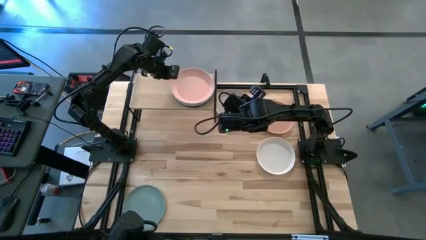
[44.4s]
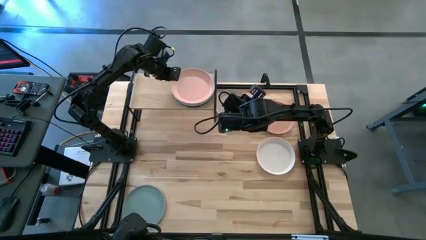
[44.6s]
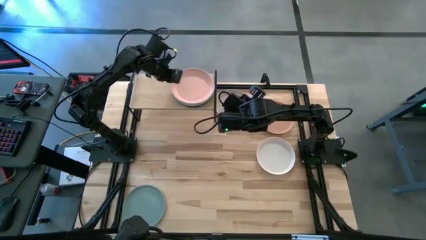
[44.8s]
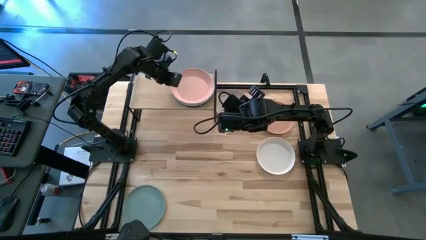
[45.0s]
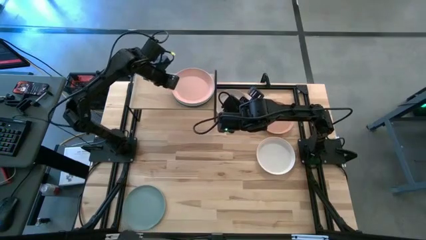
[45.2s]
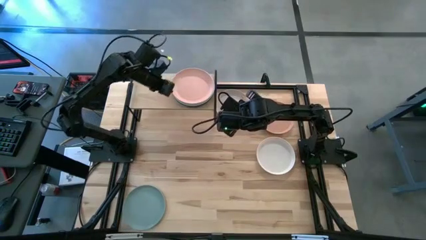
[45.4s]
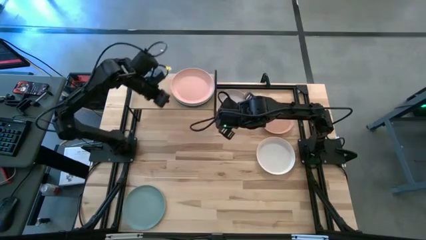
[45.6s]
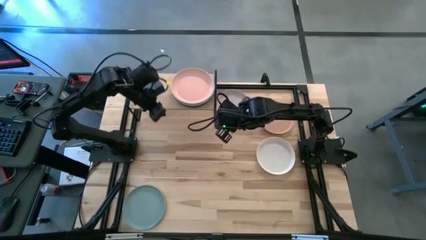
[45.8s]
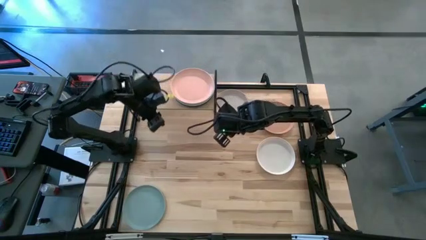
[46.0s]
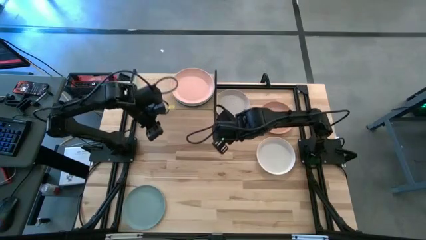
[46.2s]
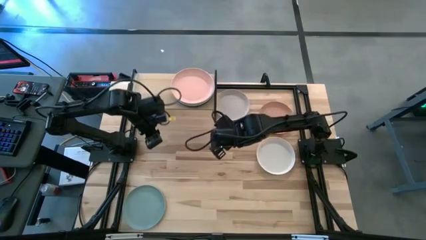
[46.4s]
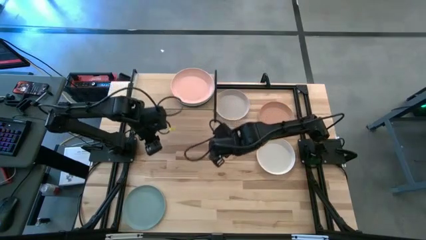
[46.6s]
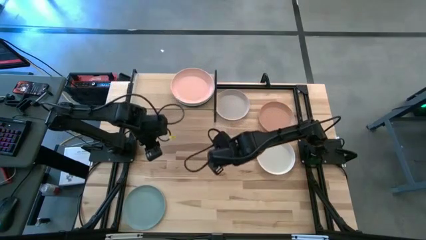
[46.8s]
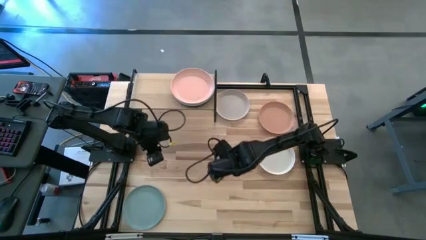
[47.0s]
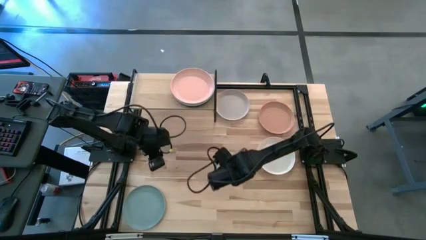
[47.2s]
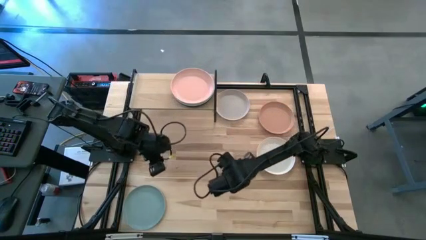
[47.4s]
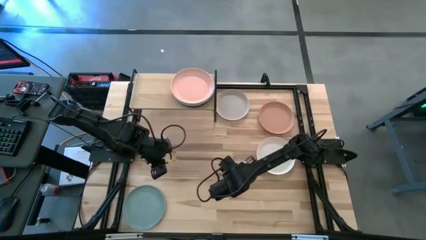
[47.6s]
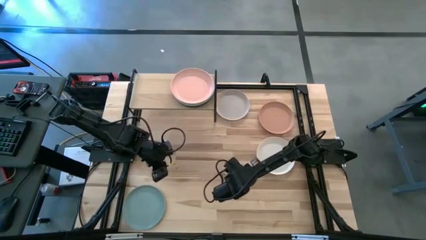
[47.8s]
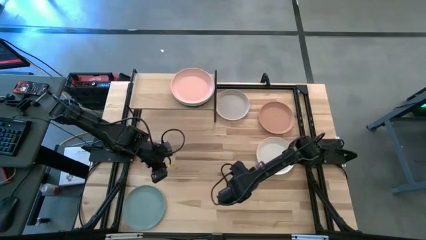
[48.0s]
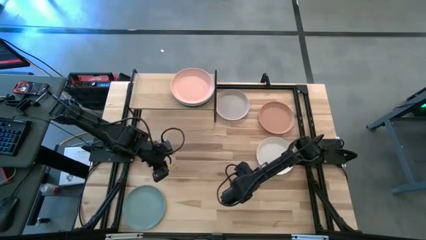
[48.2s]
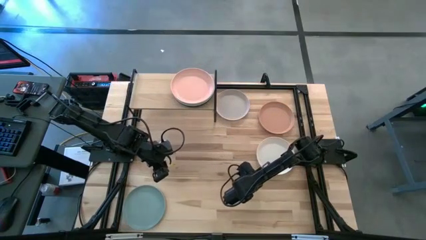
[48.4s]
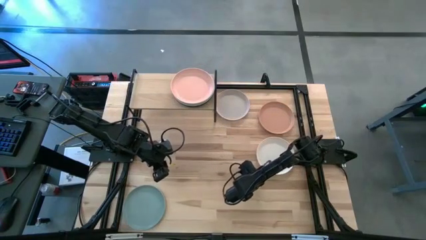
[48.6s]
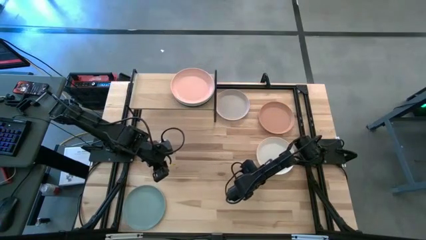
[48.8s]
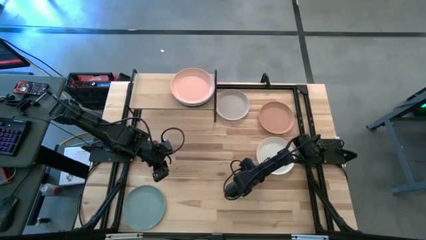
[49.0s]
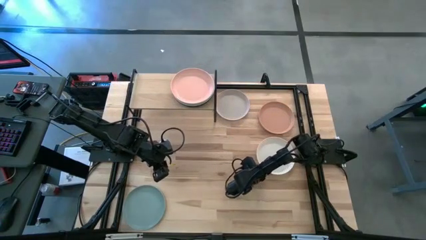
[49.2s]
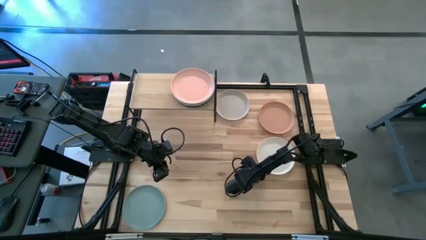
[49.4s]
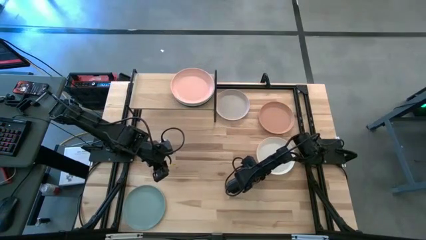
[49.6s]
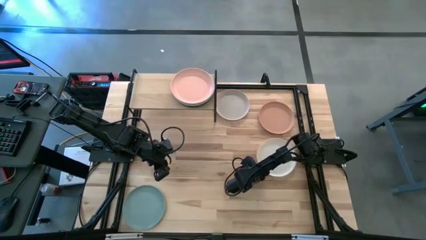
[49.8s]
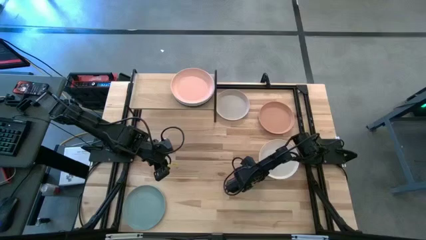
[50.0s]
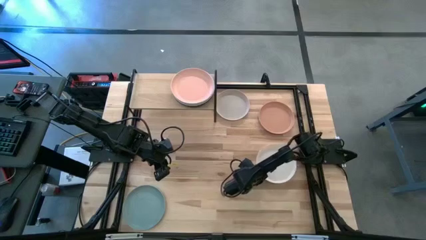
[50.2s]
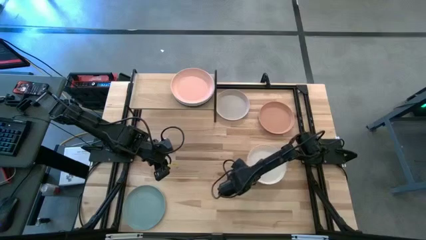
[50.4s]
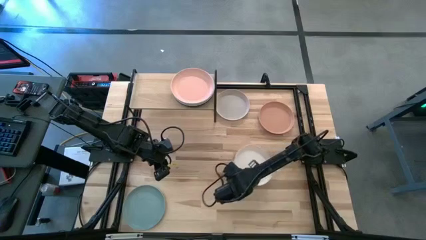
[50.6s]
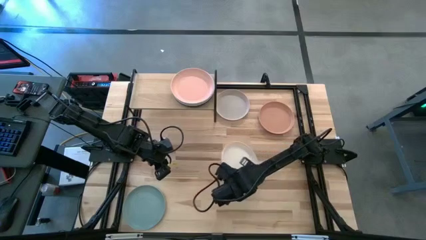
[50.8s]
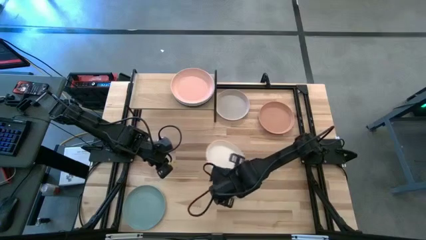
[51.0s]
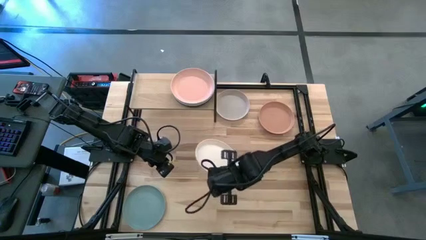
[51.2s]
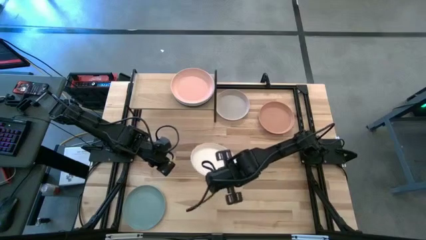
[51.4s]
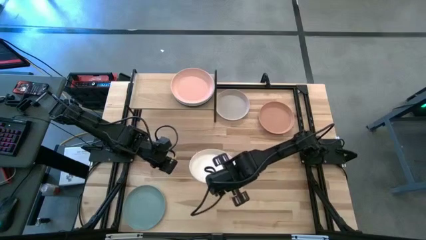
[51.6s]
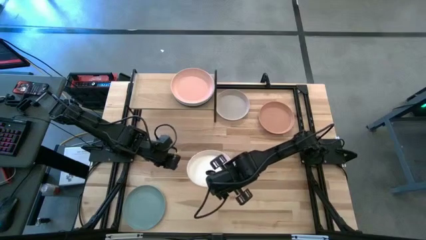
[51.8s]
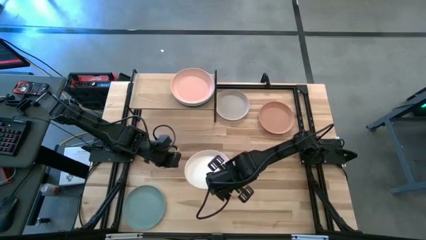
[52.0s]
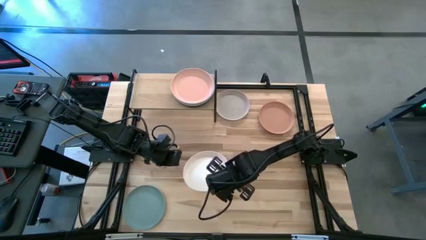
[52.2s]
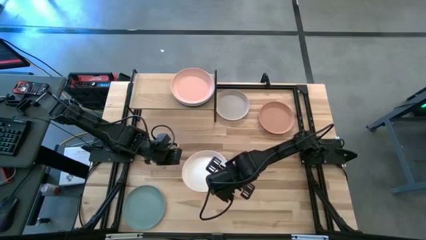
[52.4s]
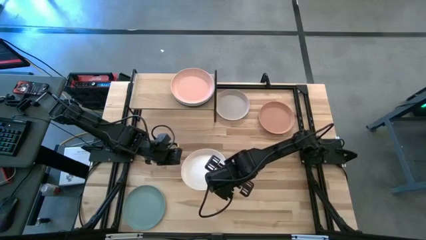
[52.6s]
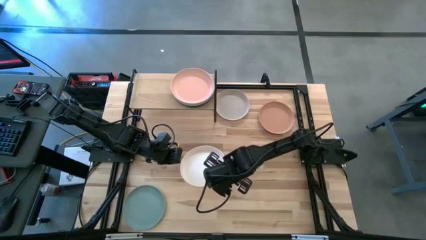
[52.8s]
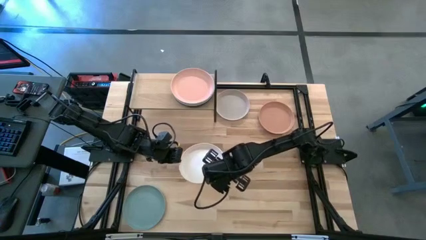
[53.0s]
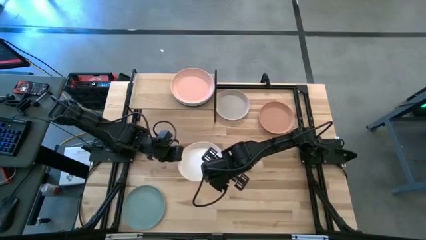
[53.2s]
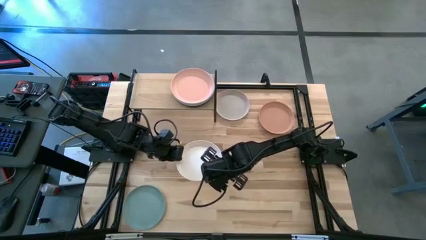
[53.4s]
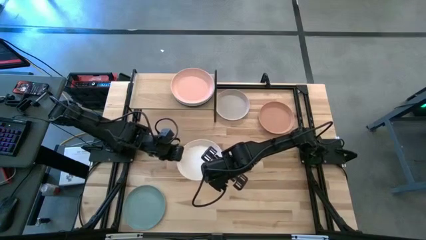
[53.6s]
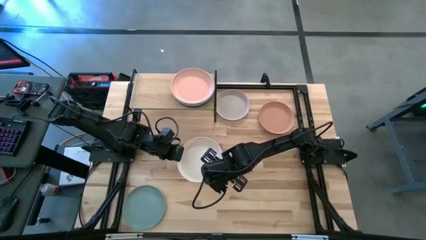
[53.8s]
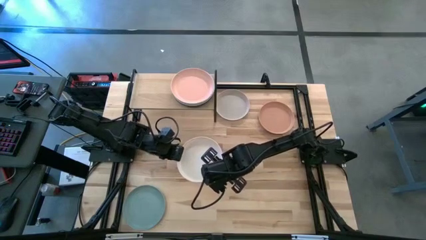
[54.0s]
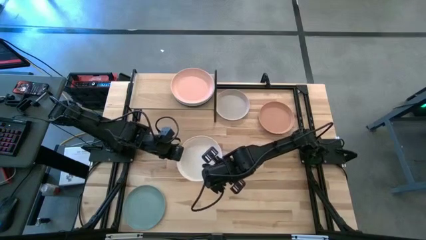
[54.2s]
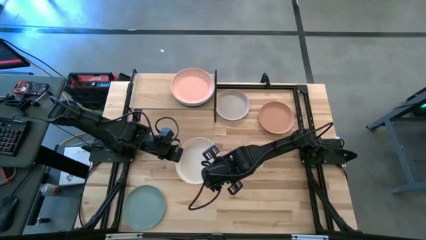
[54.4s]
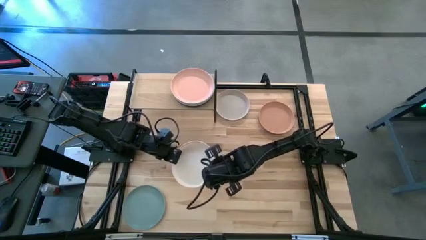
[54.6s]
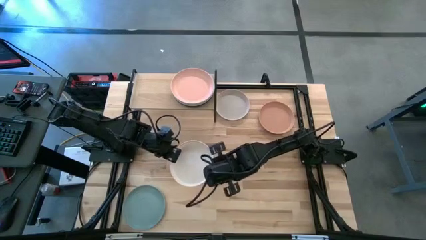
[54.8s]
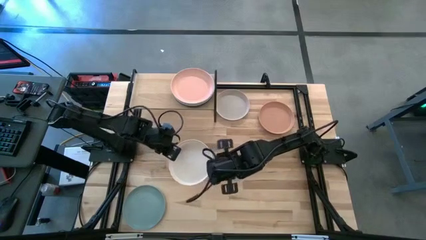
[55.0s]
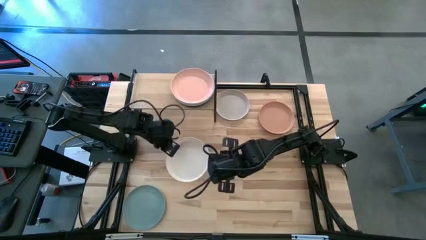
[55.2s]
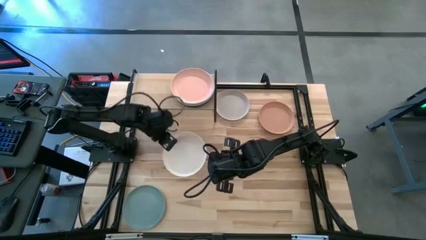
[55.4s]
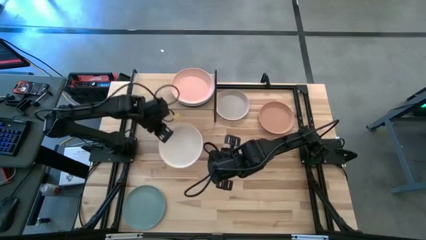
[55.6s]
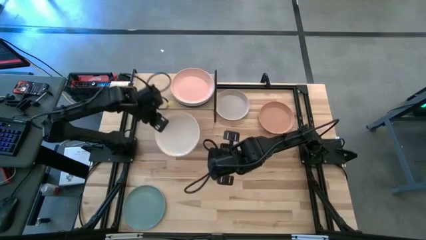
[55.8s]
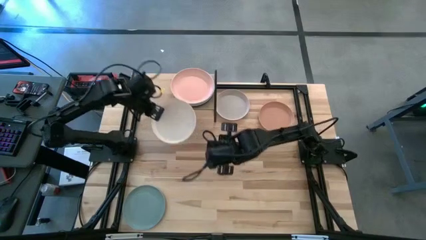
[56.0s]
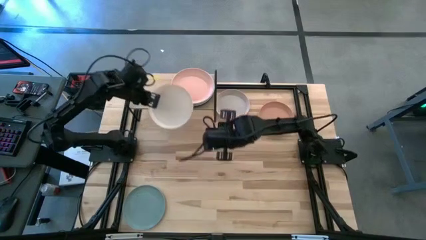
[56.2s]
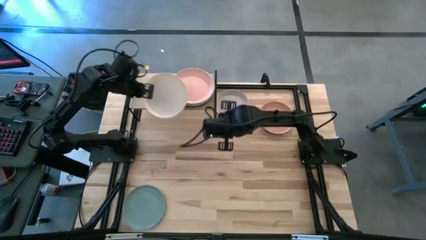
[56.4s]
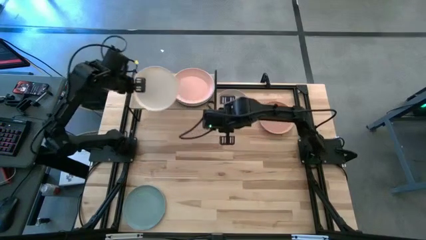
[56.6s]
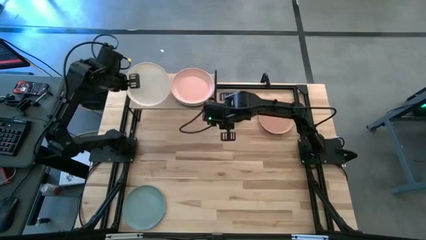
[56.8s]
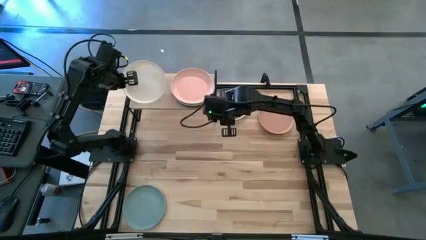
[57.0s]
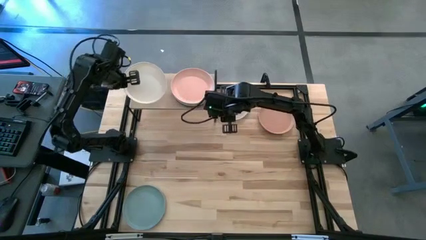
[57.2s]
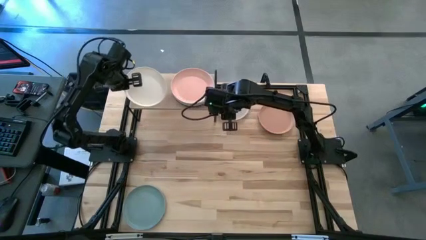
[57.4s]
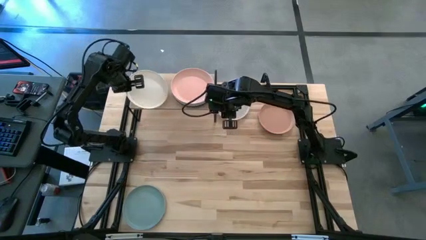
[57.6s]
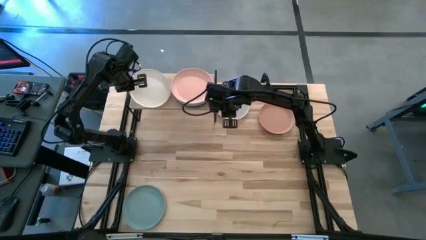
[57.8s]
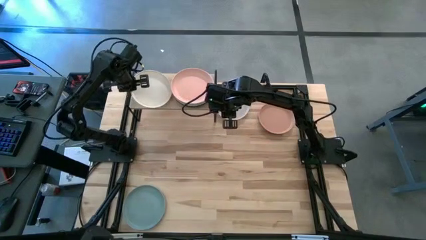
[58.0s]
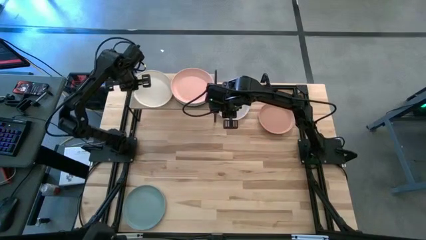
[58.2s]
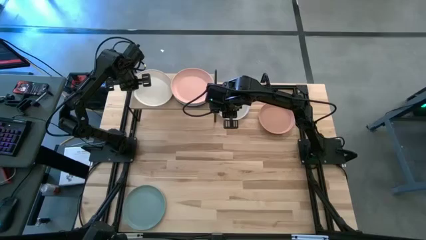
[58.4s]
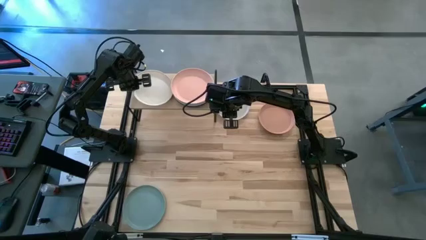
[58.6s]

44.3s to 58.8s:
Task: Place and stack plates onto a shelf
Put the bottom white plate on the shelf

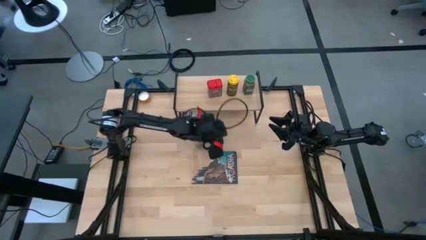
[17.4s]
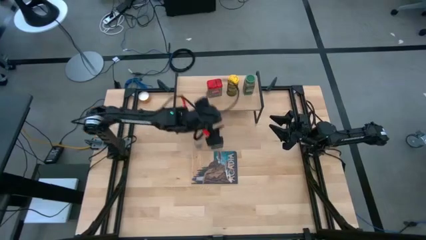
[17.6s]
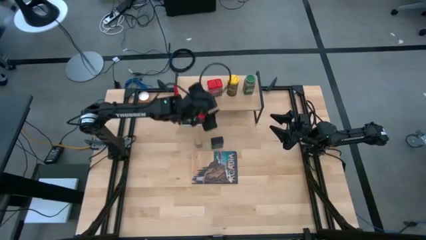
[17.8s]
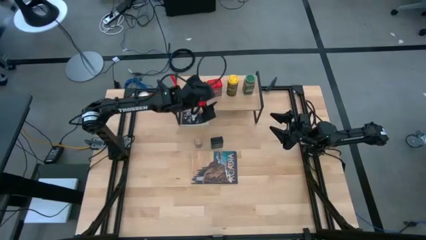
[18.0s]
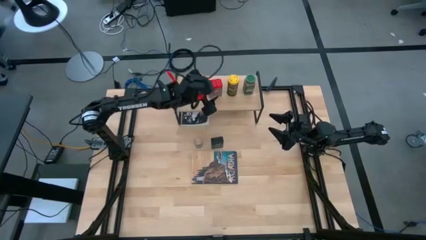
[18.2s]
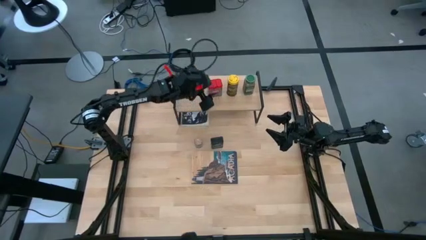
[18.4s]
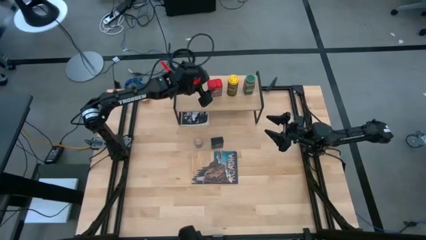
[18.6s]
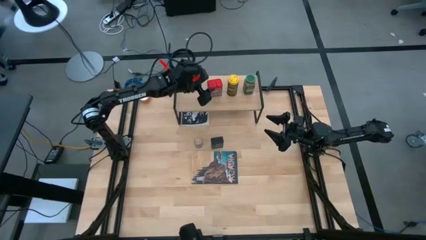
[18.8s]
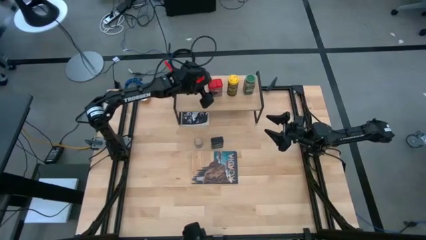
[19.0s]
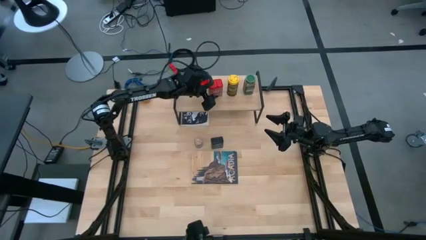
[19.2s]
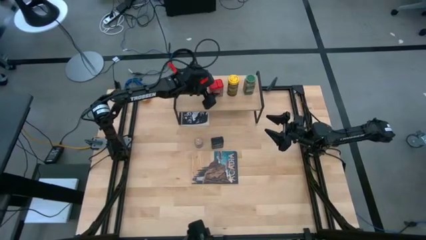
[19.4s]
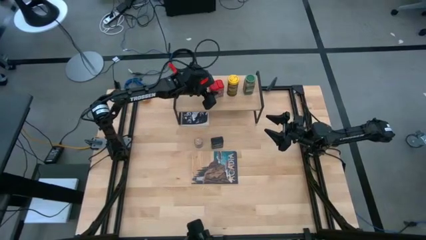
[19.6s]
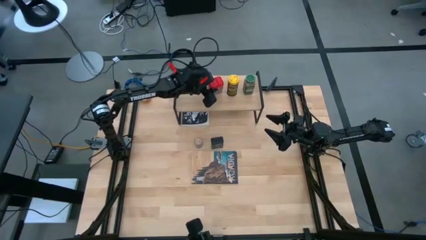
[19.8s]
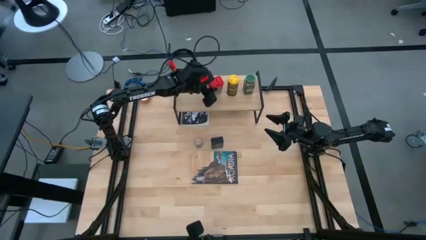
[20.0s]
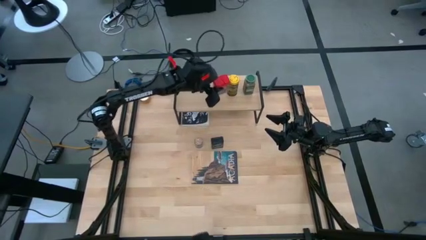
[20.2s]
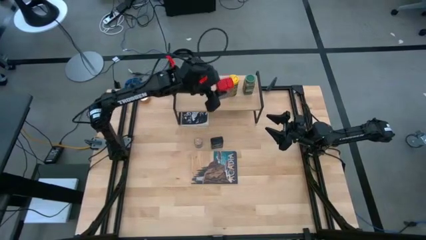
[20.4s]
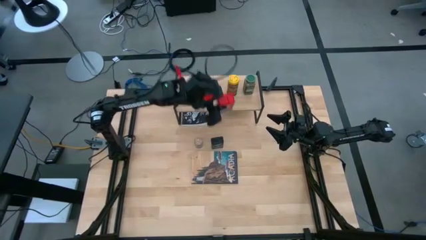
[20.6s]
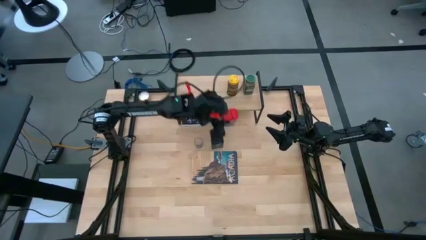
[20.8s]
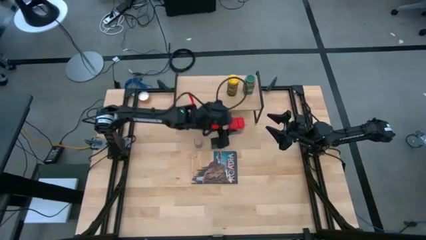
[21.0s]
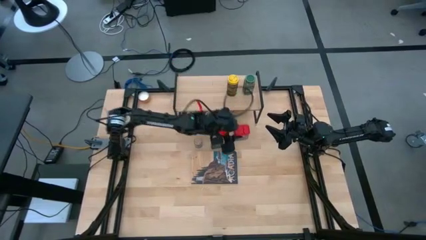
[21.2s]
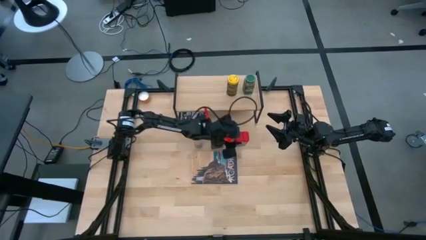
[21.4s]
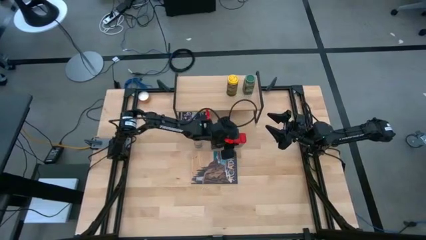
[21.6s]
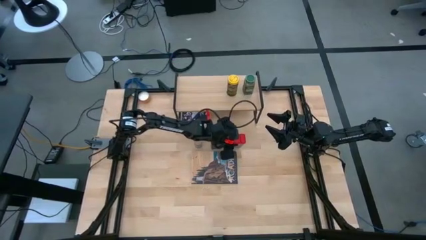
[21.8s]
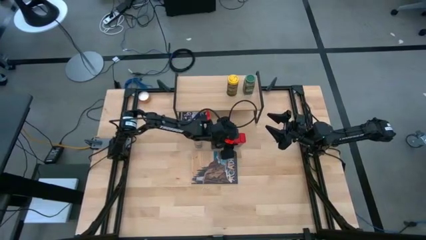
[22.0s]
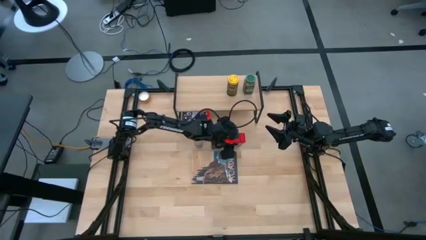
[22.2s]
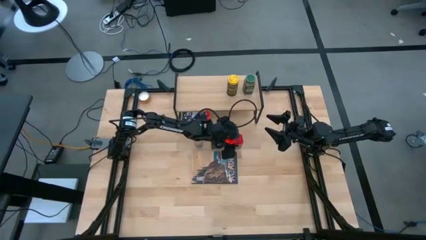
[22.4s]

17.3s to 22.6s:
Task: Shelf spices
Remove the red seasoning can from the shelf
